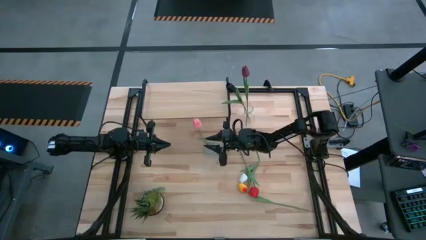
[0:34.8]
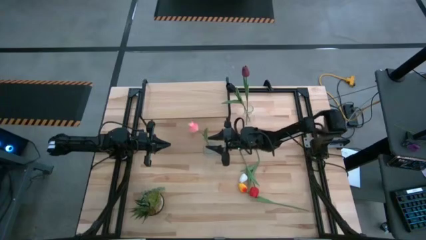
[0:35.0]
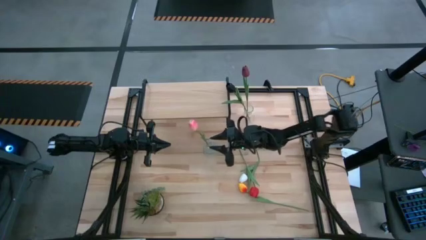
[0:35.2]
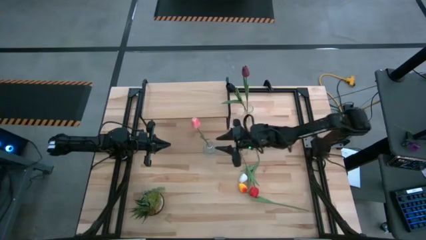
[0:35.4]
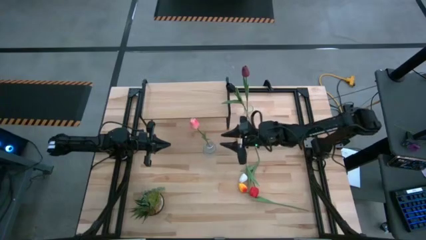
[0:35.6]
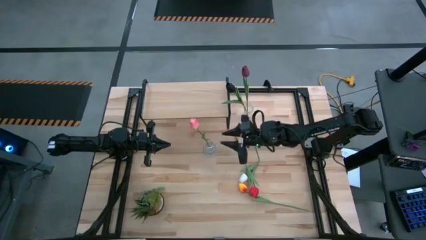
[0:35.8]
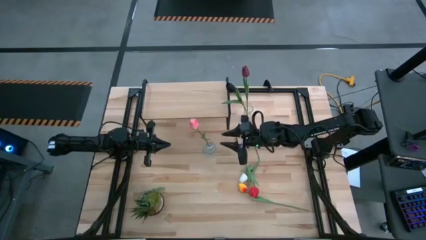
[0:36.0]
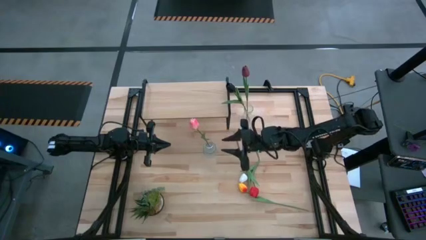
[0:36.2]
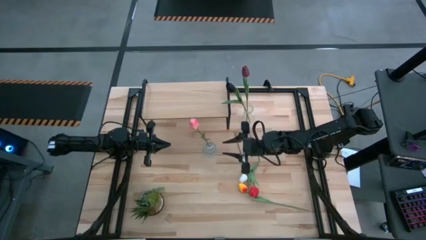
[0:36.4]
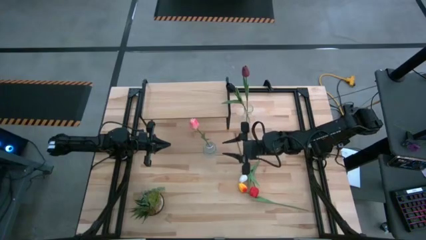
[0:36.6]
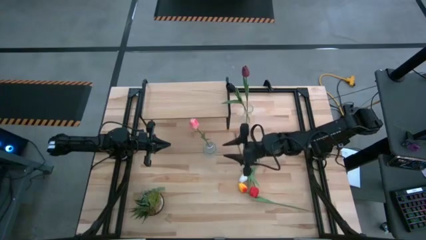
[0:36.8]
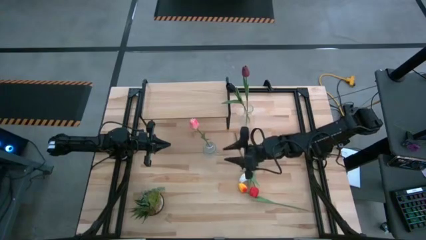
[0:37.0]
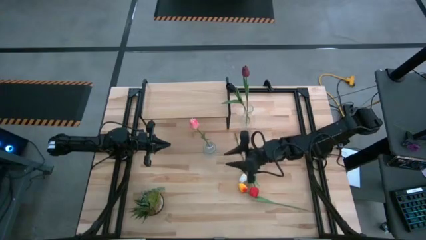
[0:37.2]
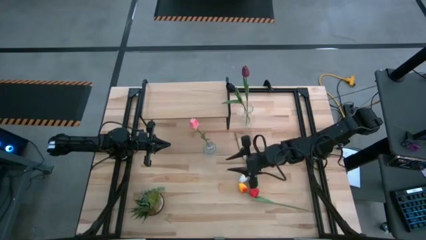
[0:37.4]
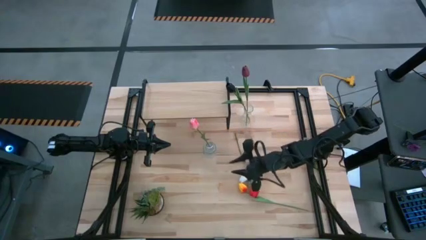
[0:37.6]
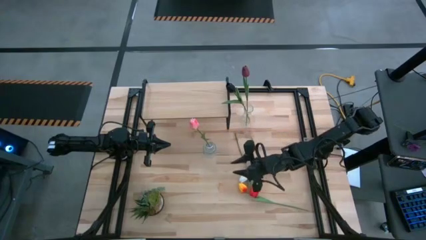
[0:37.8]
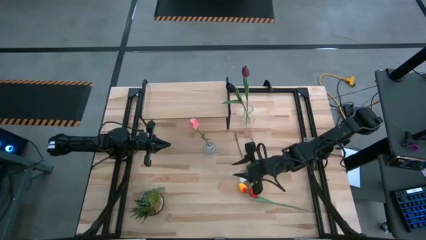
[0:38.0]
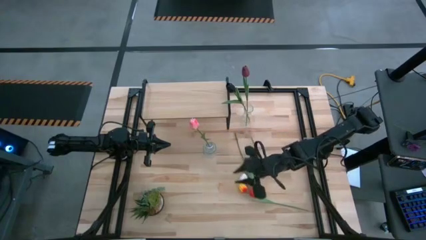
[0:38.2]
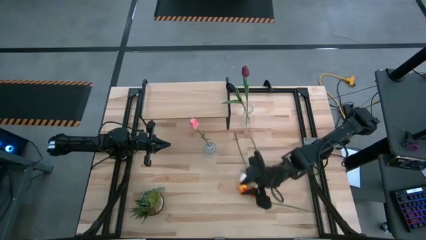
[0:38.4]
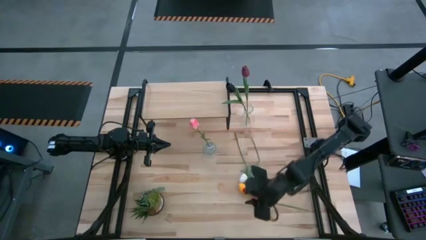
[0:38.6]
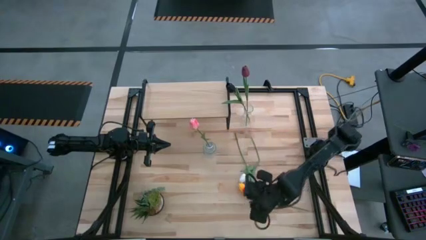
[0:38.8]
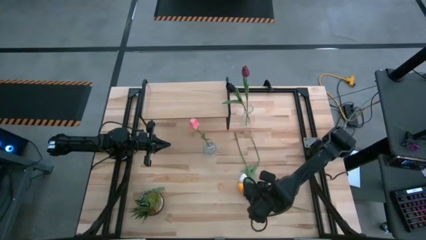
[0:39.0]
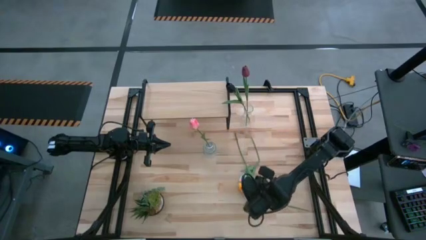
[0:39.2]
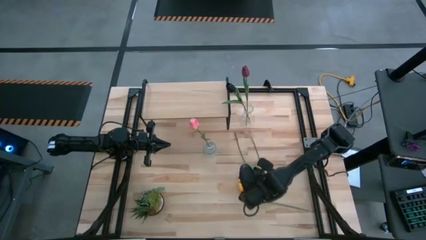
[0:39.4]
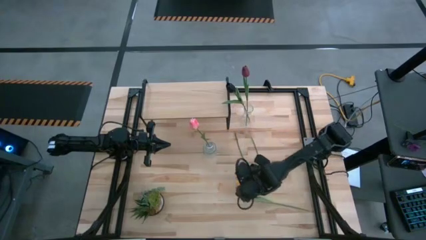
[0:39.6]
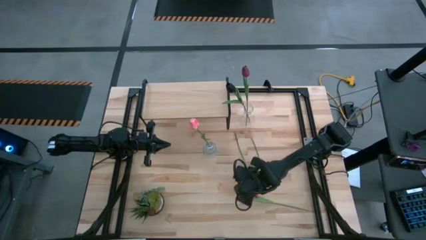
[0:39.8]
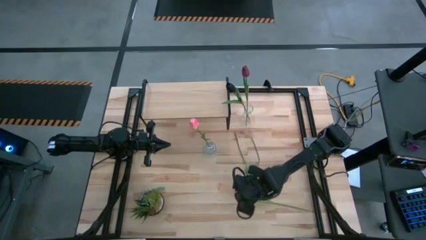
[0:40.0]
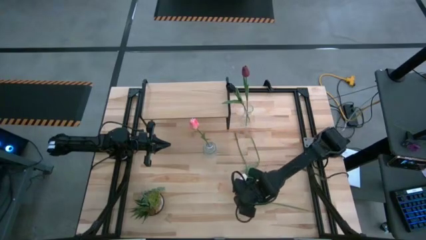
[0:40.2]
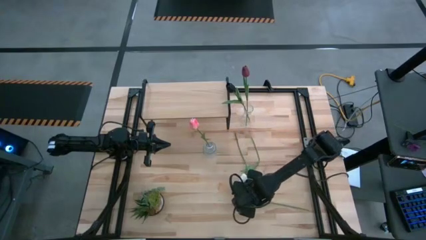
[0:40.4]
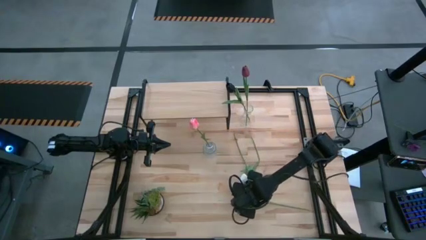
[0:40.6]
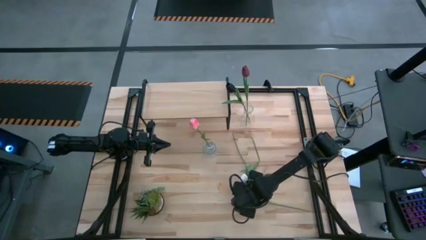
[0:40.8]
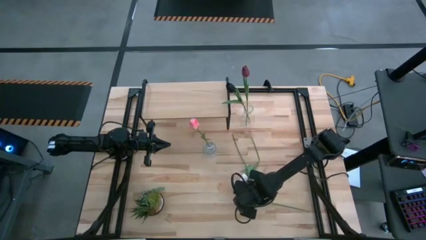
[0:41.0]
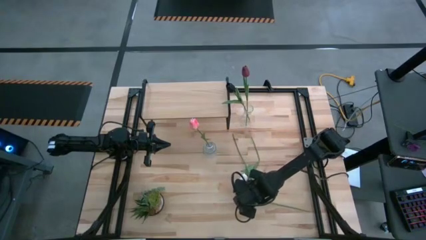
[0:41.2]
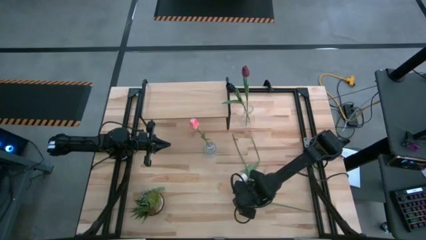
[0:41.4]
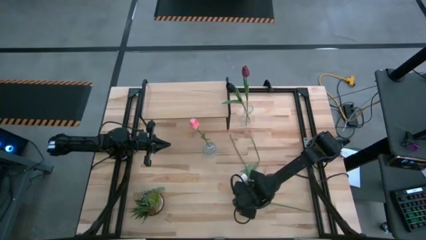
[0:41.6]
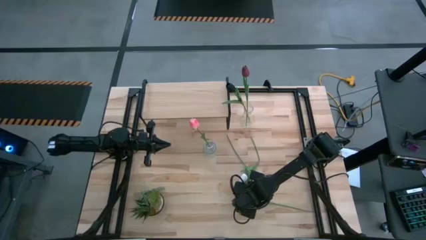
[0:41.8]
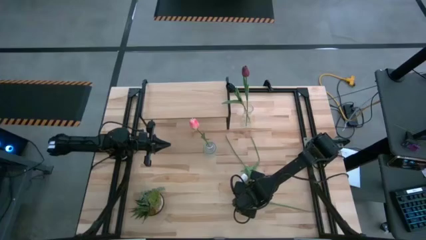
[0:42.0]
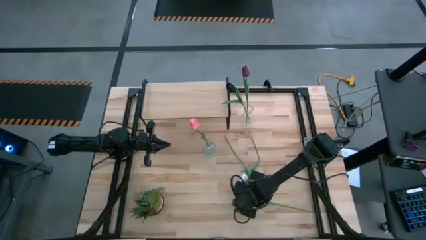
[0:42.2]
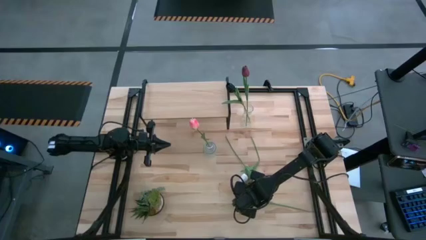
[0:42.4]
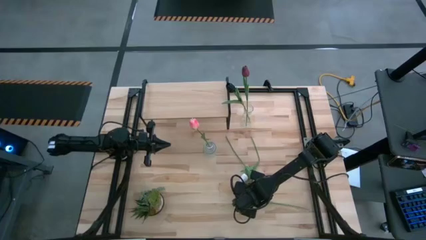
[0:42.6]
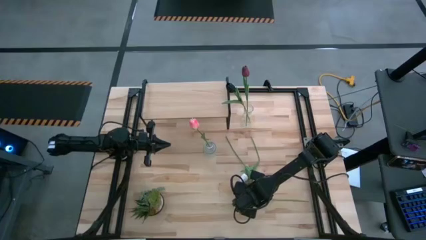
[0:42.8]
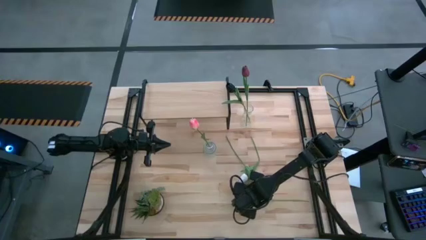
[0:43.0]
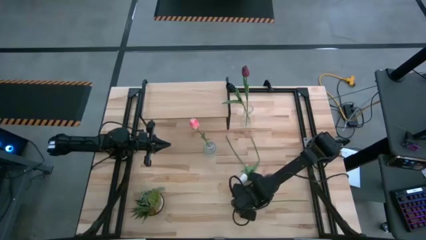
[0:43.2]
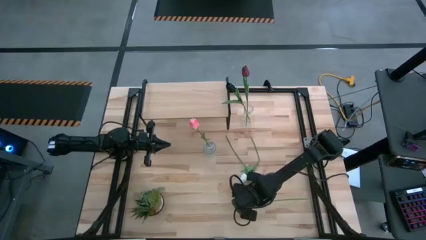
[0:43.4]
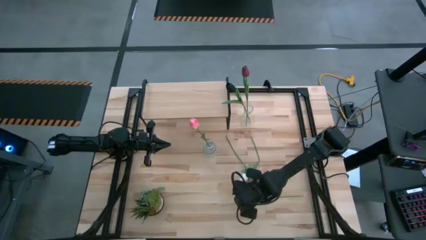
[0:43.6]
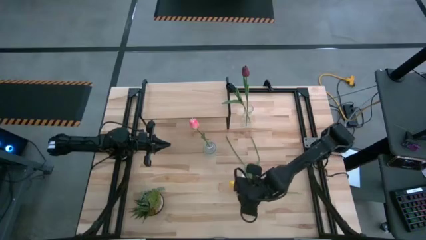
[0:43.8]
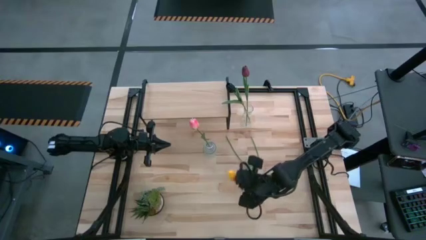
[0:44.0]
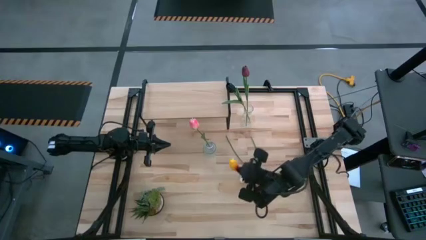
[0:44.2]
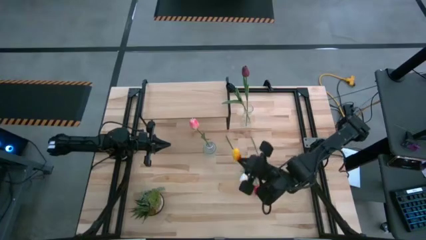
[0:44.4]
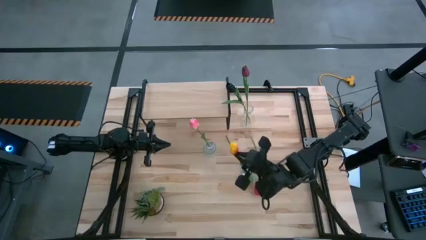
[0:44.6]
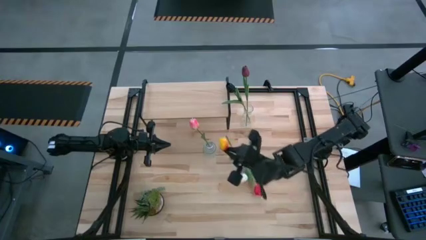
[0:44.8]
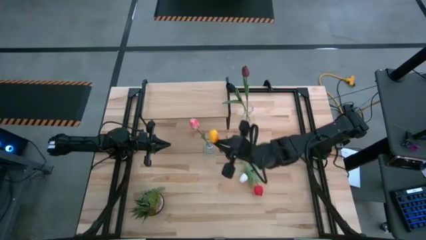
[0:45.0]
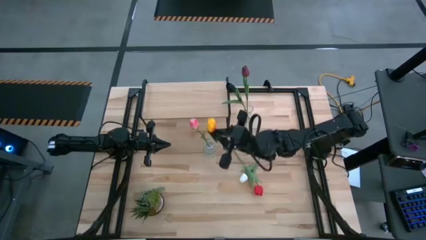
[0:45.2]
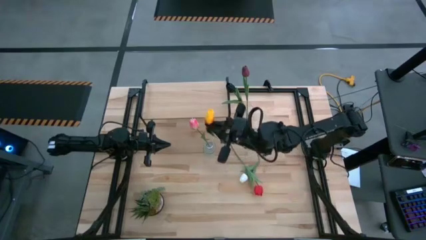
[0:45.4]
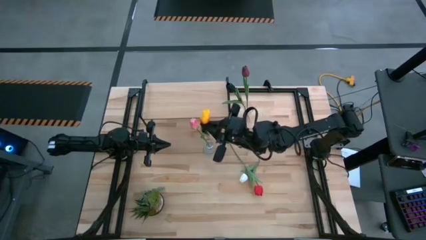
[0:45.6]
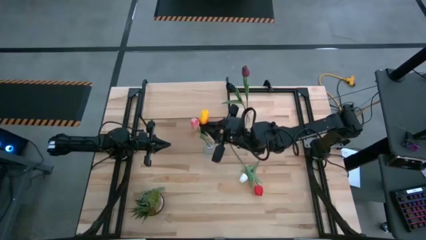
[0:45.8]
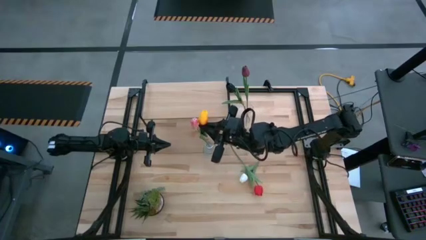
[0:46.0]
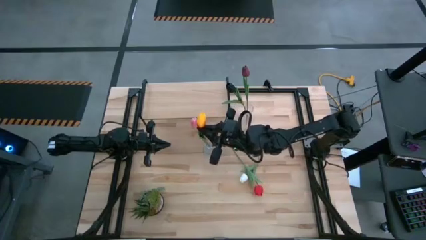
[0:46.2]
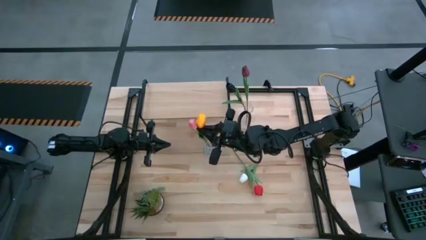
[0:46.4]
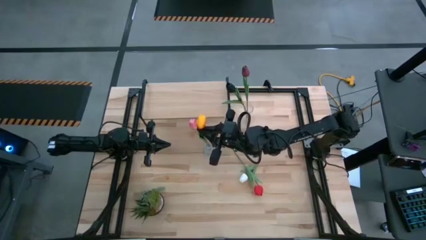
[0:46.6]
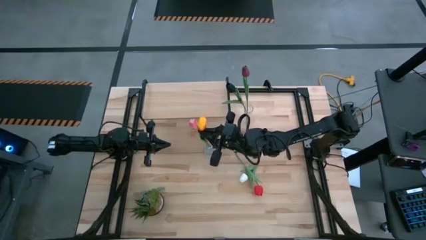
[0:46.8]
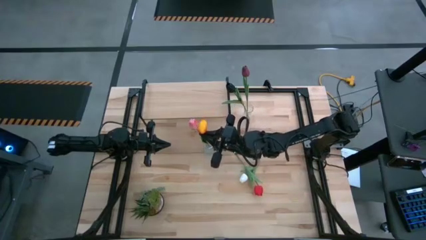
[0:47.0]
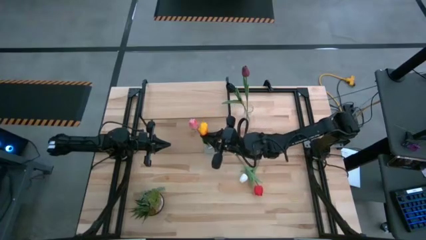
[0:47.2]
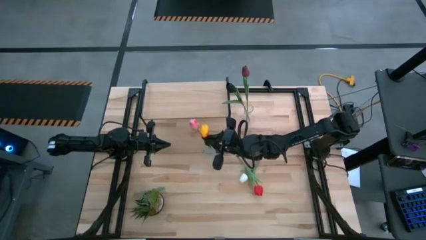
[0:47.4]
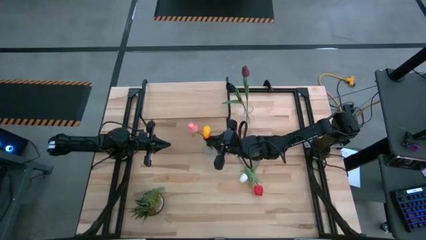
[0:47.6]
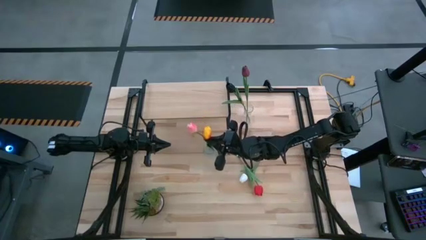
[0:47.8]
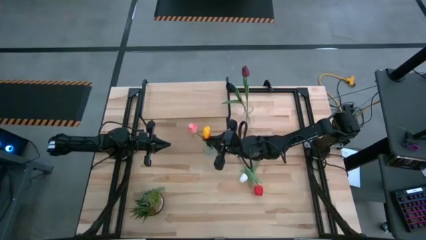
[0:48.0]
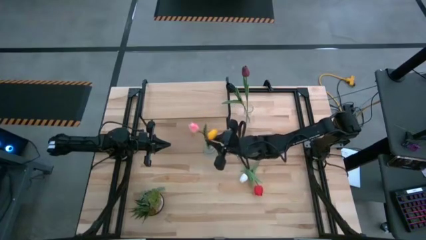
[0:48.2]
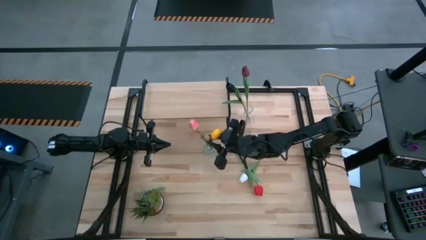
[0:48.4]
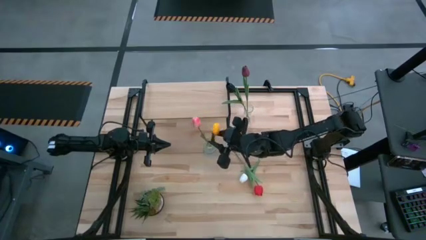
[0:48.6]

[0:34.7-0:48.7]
Task: Pick and place flowers into a vace then onto a shelf
Put the yellow tulip into the bottom transparent vase
